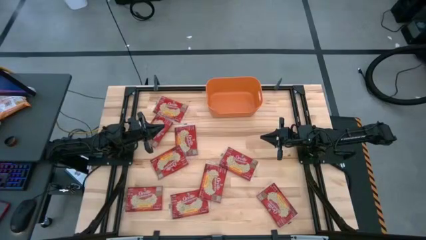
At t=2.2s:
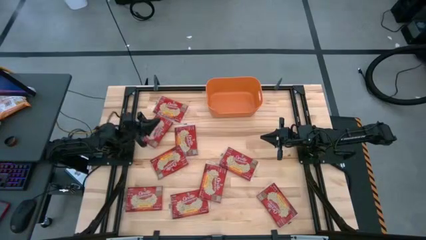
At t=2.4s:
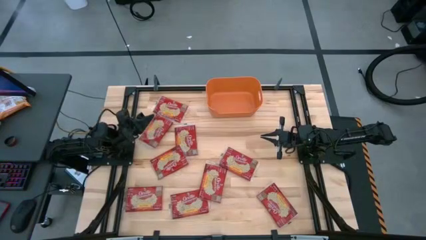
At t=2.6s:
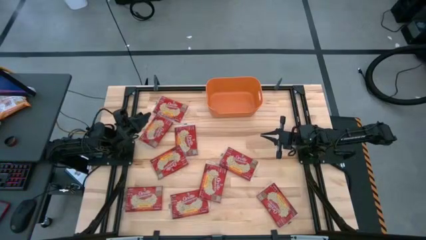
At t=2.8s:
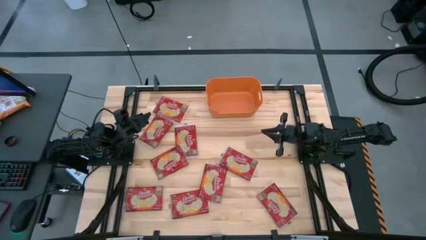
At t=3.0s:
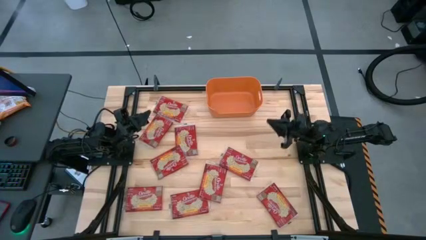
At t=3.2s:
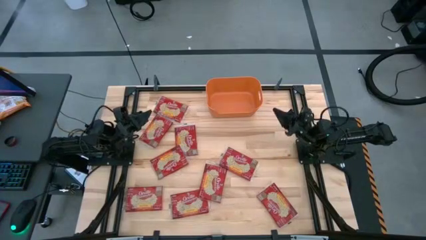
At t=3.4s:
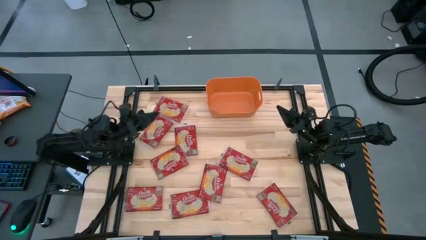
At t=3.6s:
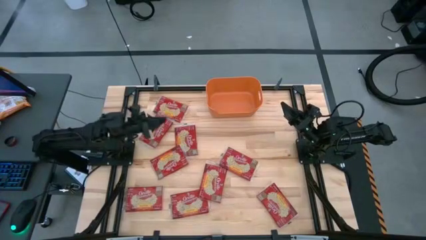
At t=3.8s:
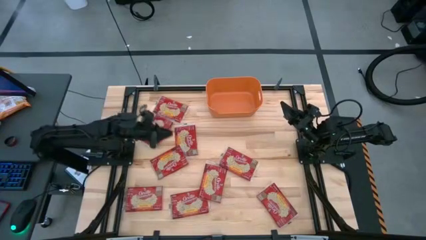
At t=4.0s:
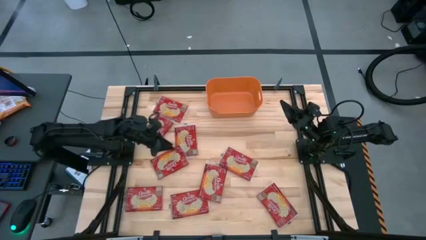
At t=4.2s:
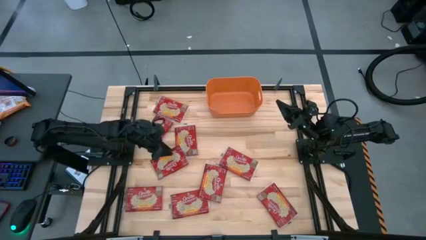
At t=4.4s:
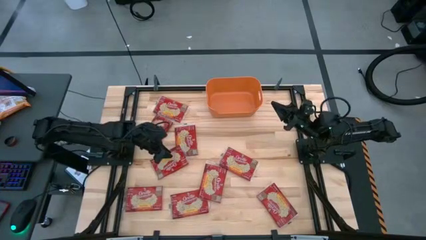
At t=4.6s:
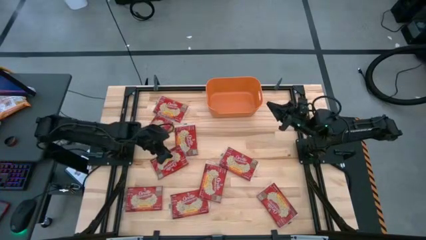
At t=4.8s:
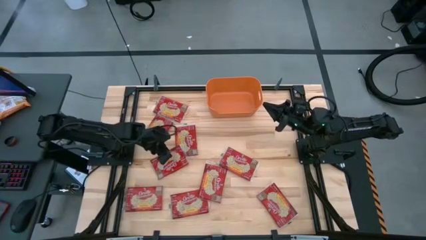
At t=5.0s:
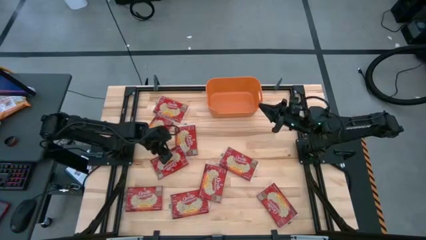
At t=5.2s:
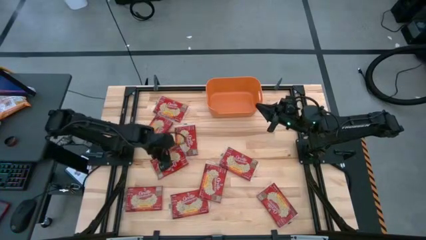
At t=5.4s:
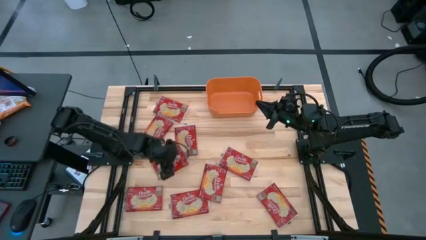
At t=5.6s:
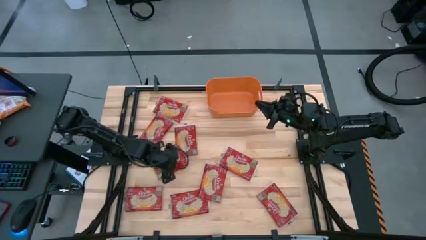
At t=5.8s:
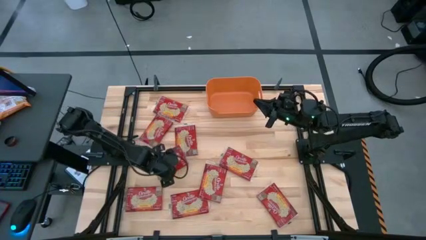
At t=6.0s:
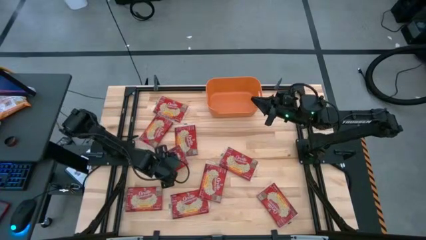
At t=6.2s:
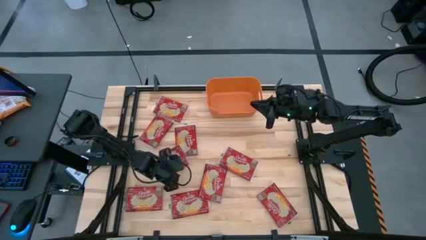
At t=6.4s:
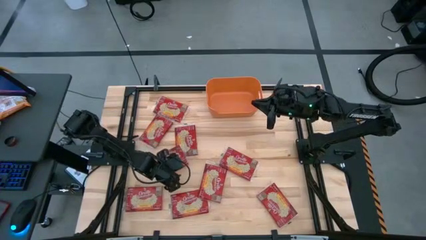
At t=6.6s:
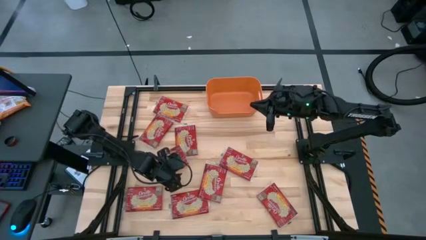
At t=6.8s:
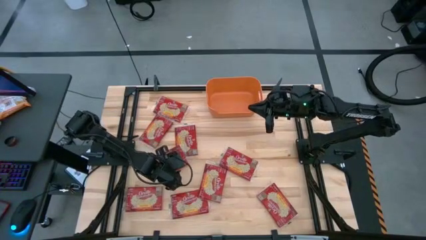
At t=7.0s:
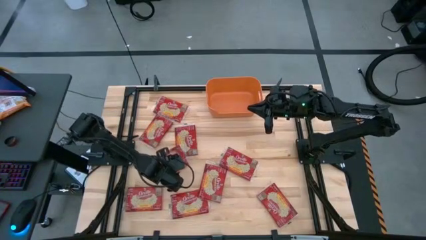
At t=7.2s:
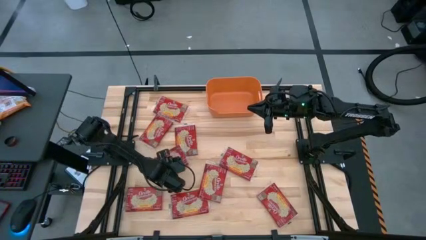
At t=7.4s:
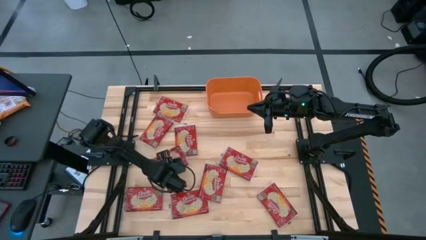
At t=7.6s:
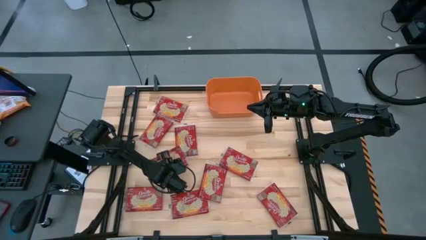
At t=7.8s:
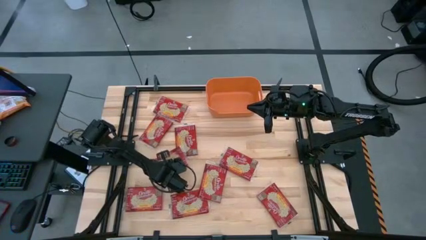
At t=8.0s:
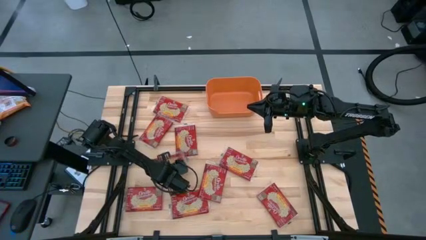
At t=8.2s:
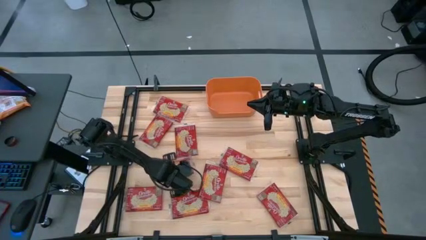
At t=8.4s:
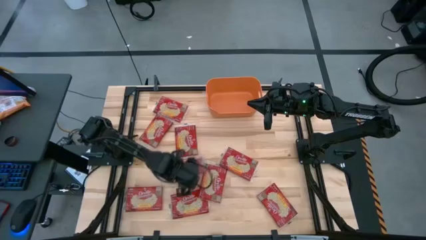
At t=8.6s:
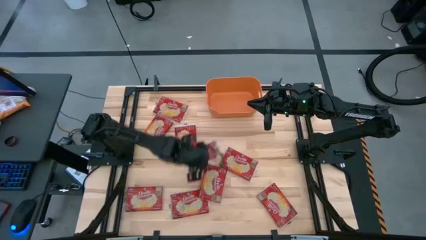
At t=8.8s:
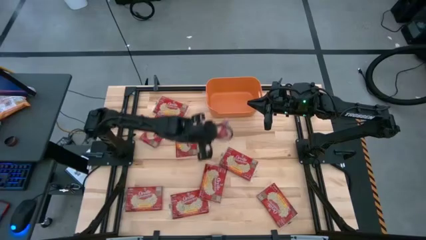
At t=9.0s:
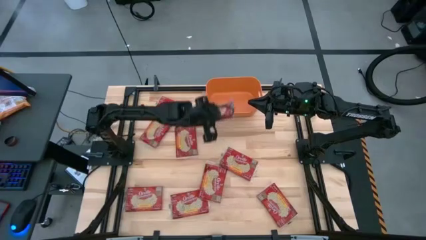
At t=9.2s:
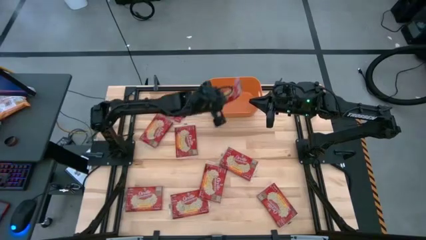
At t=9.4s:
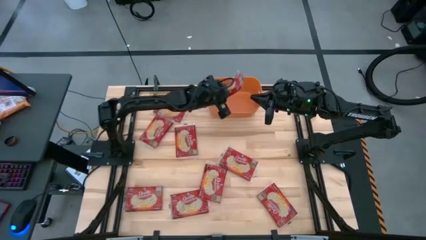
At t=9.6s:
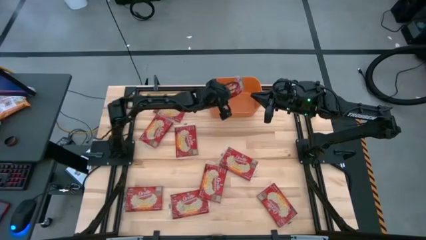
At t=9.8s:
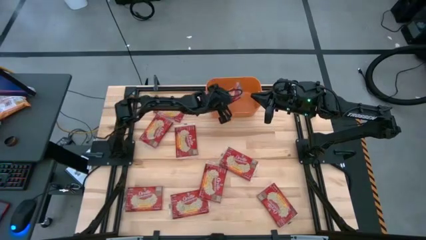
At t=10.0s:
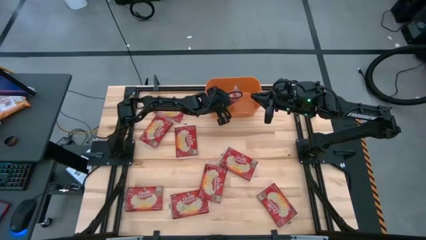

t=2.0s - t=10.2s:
Task: Sort popcorn bags into baskets
Put the popcorn pack into the orange bin

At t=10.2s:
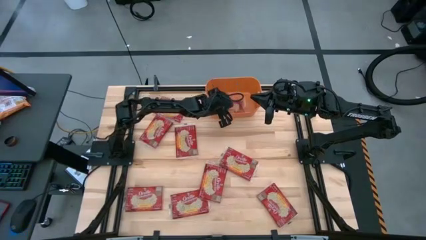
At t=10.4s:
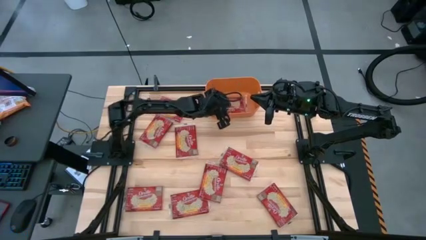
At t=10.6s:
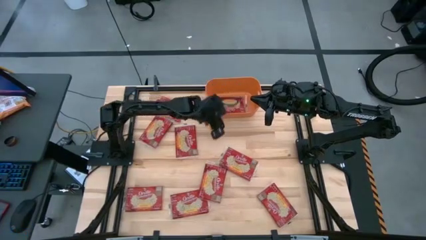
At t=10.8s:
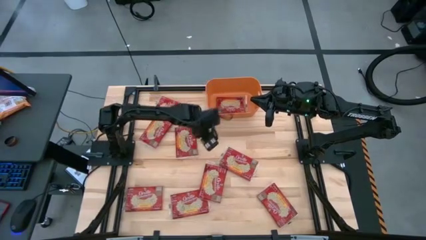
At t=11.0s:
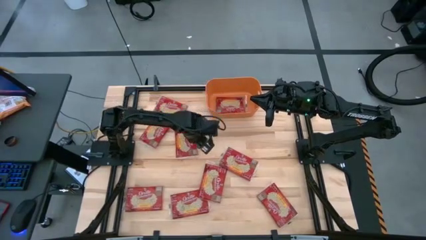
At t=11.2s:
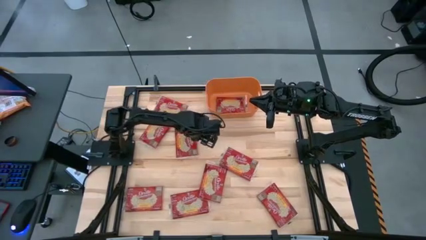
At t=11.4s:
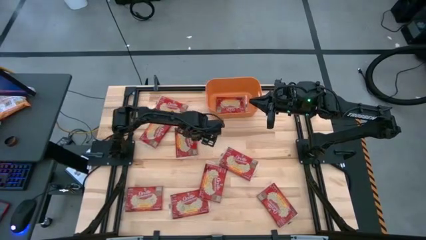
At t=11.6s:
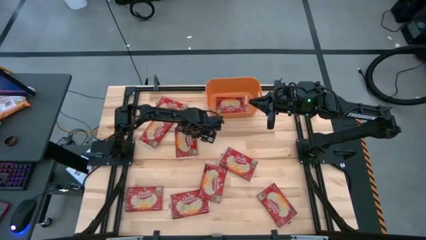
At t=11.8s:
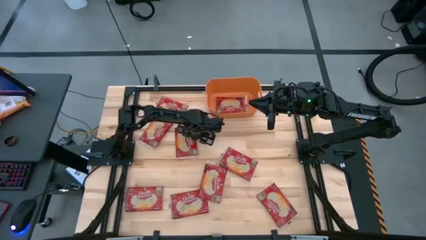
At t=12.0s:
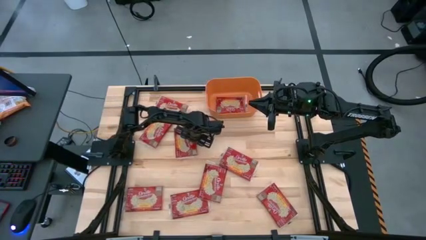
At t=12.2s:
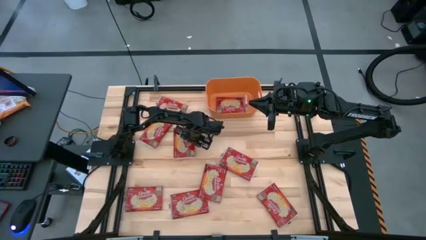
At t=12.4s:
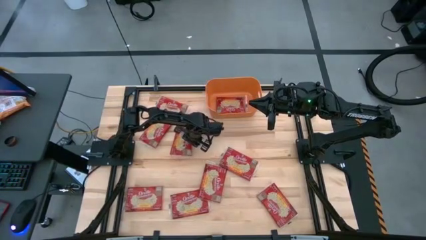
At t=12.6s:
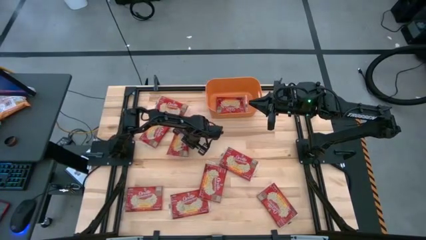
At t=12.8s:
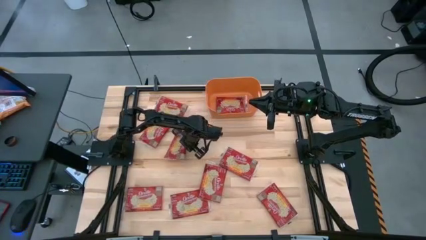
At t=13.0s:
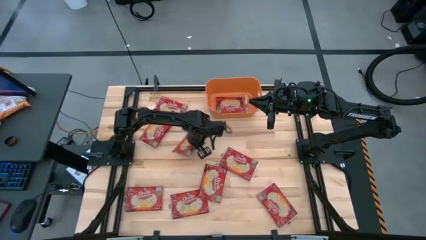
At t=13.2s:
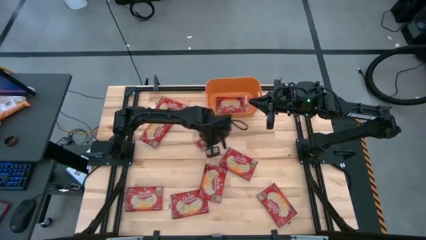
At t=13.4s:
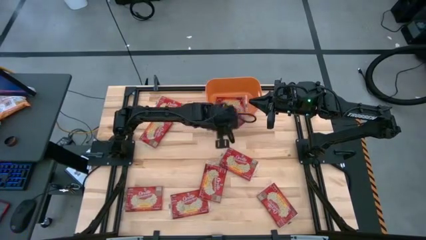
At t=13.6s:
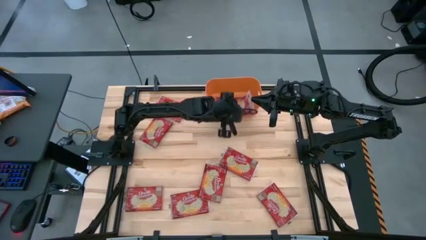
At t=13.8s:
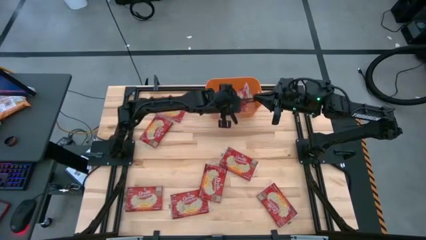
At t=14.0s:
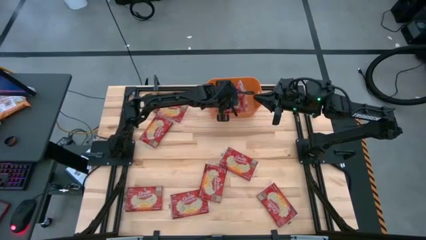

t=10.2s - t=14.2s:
Put the popcorn pack into the orange bin

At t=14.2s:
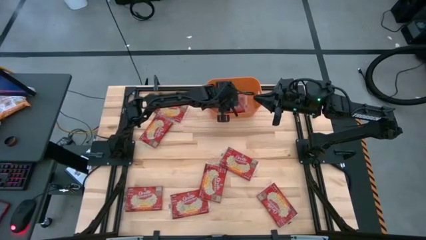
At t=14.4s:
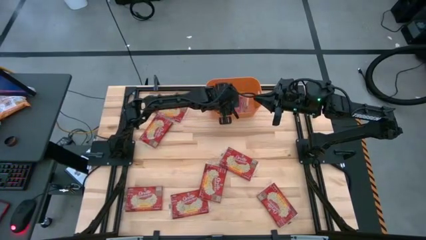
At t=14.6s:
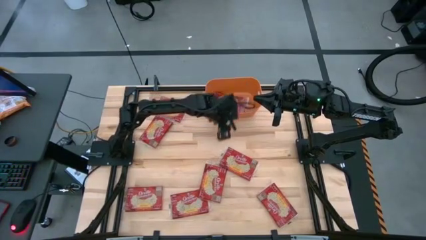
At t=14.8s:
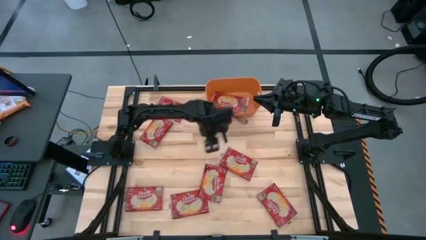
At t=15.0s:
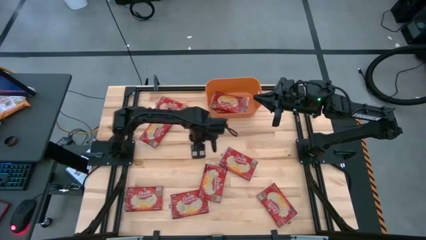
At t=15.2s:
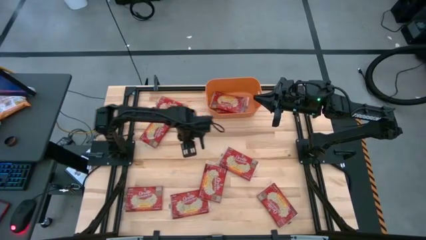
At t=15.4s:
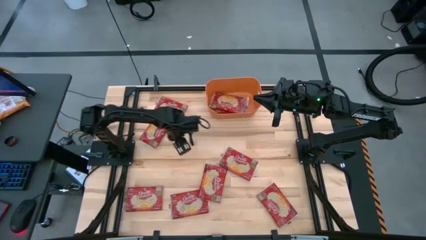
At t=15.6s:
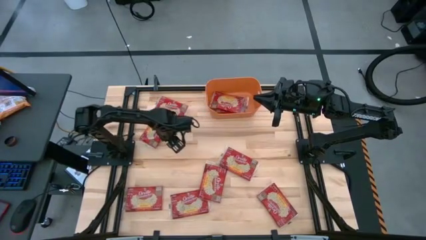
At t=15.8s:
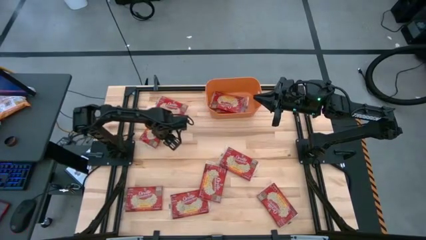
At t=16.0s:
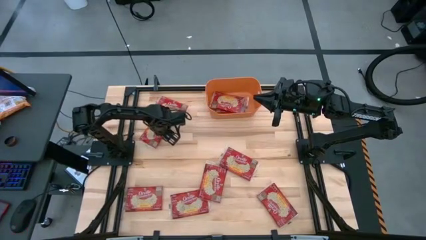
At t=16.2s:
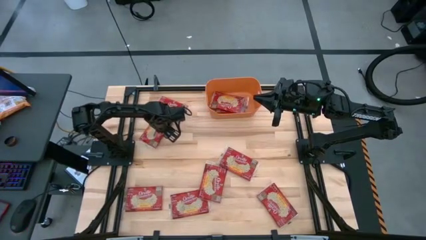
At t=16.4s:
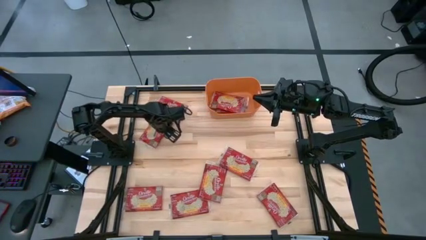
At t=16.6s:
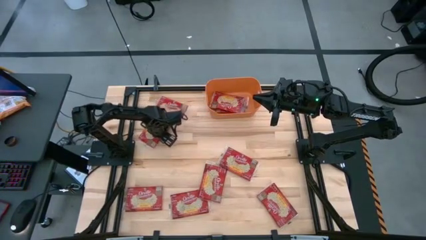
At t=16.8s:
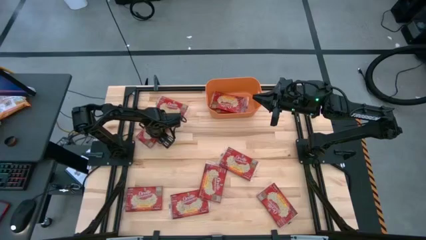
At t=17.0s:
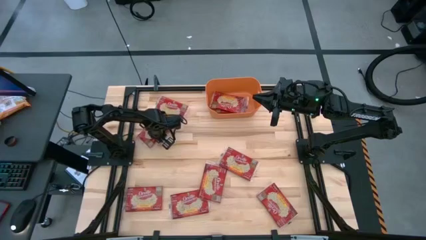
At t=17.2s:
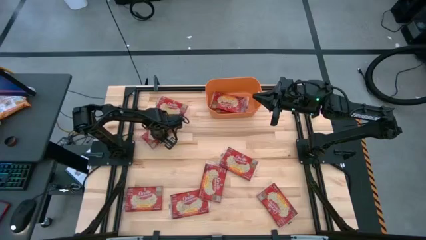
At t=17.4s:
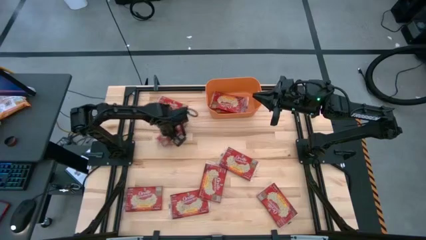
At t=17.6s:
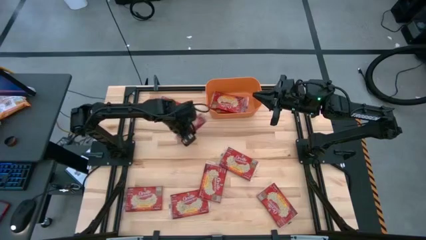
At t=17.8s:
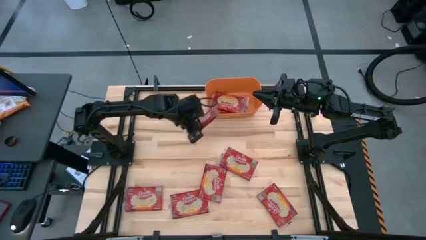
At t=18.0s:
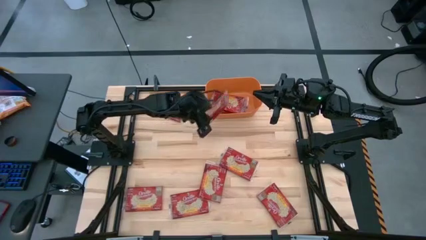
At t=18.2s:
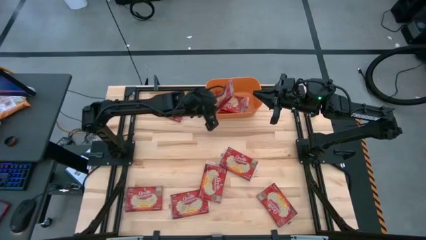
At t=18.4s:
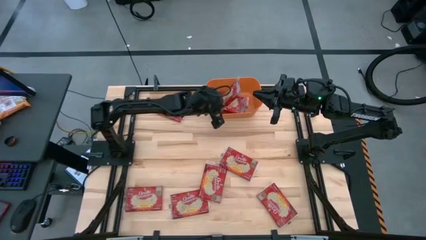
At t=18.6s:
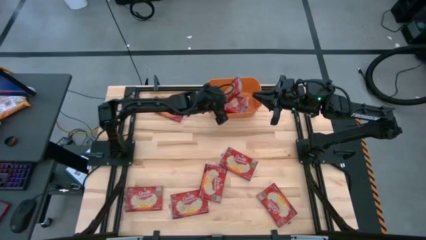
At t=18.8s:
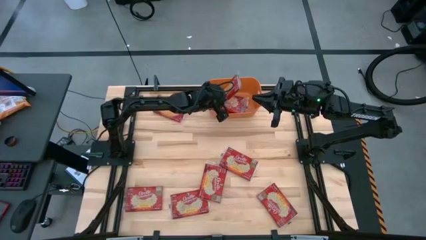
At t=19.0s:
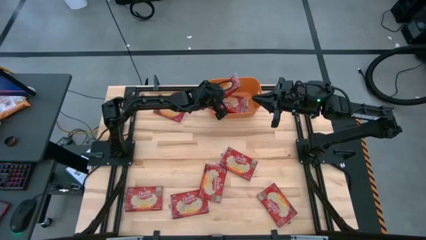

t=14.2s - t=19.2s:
Put the popcorn pack into the orange bin
